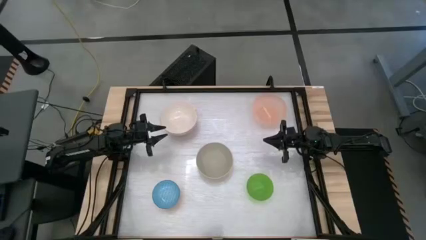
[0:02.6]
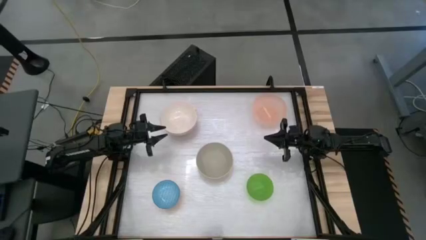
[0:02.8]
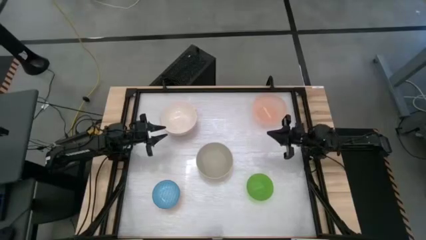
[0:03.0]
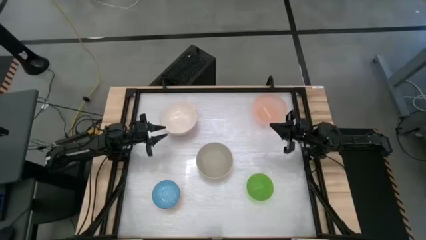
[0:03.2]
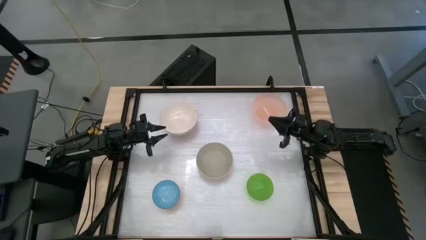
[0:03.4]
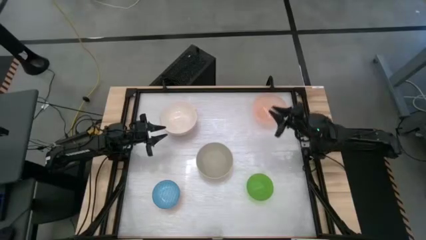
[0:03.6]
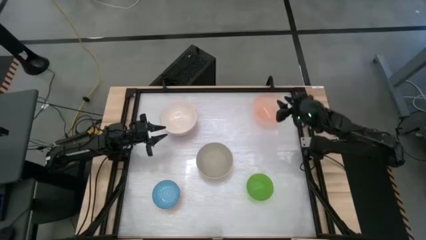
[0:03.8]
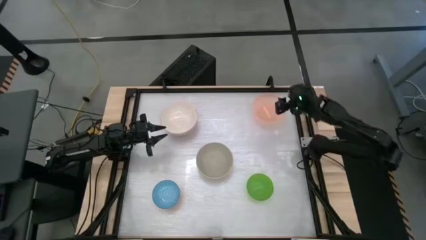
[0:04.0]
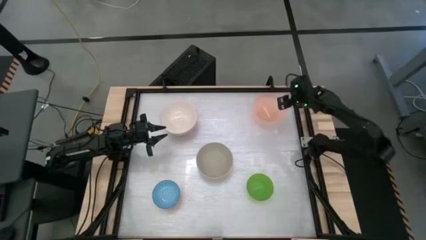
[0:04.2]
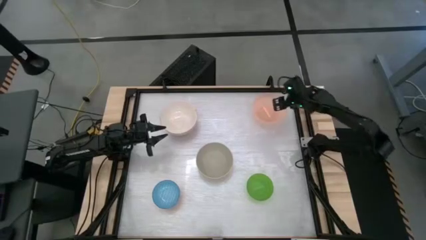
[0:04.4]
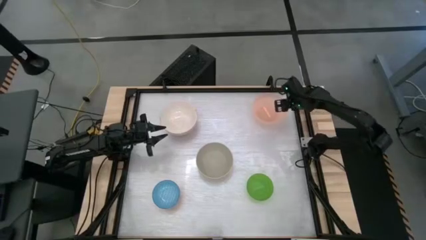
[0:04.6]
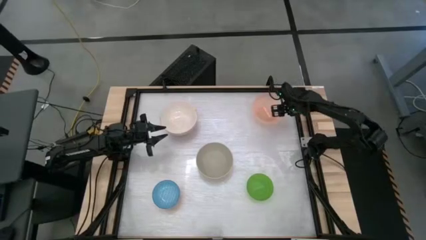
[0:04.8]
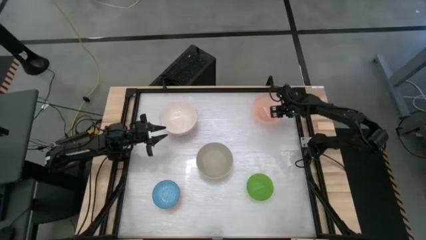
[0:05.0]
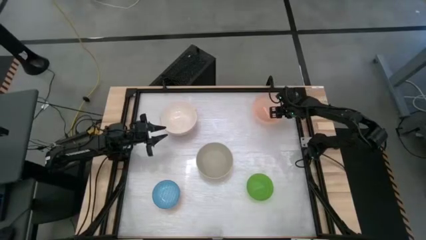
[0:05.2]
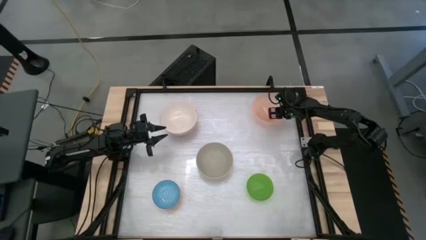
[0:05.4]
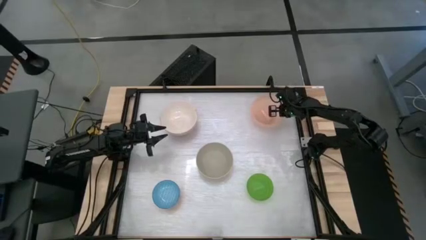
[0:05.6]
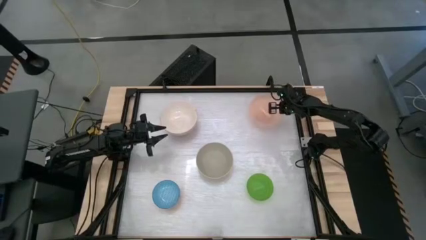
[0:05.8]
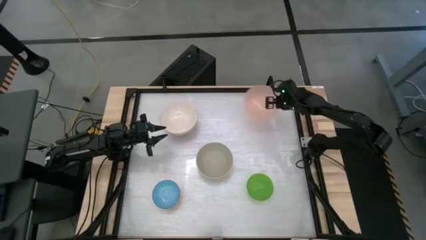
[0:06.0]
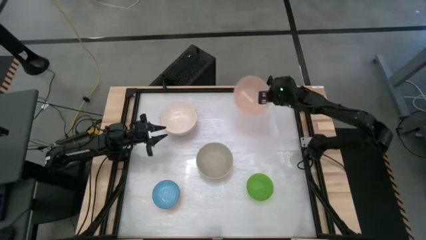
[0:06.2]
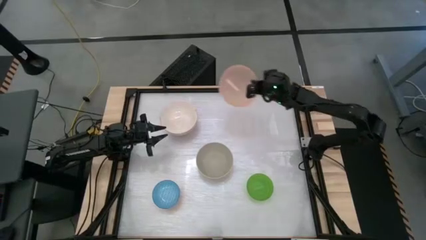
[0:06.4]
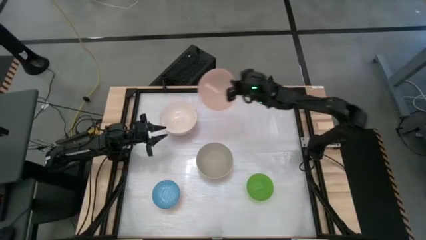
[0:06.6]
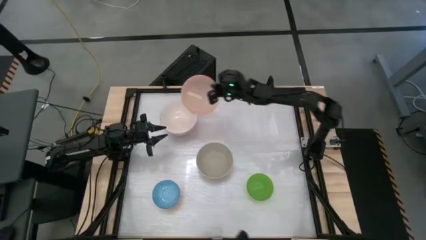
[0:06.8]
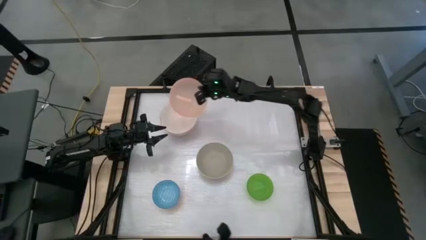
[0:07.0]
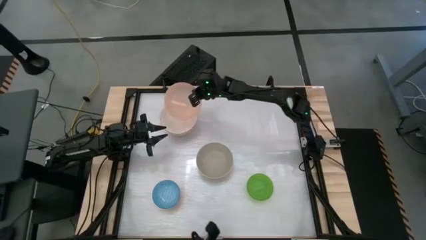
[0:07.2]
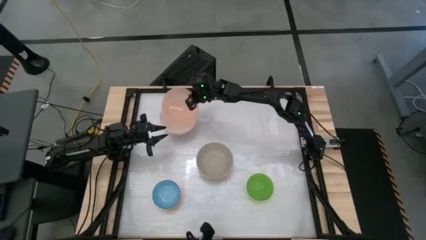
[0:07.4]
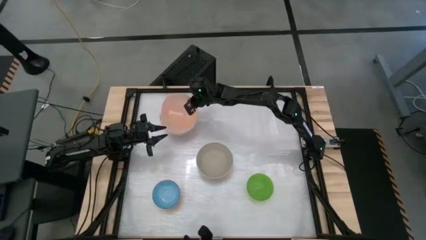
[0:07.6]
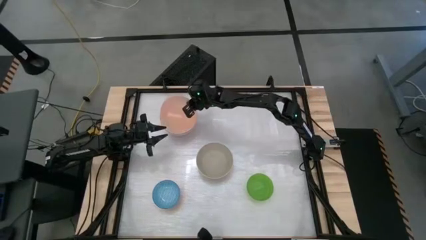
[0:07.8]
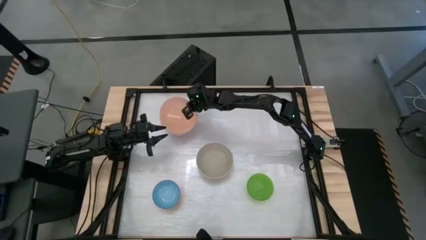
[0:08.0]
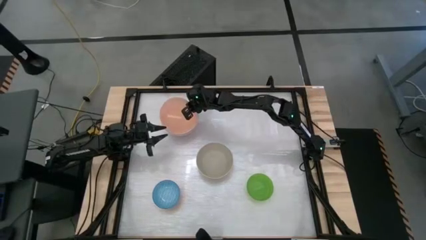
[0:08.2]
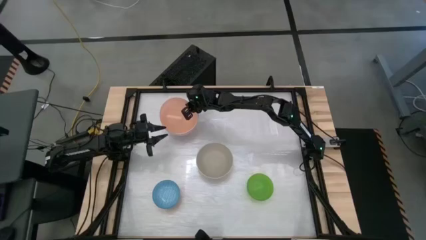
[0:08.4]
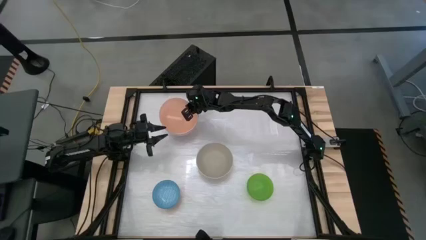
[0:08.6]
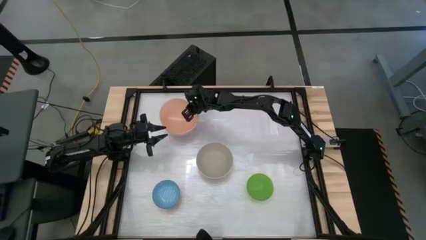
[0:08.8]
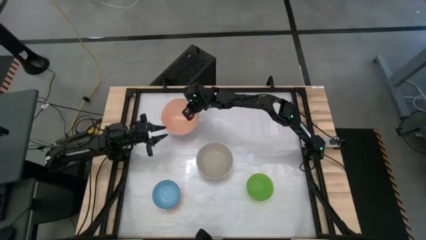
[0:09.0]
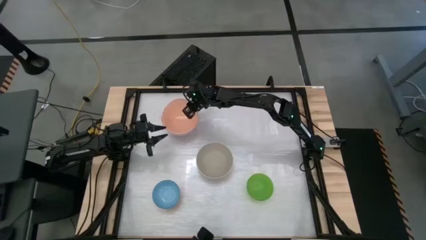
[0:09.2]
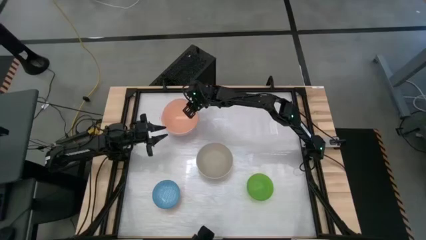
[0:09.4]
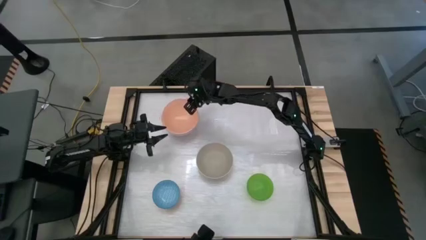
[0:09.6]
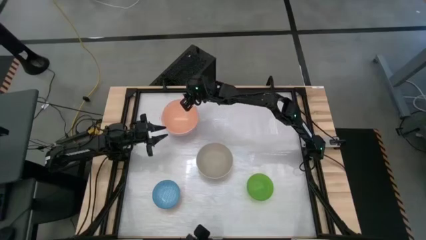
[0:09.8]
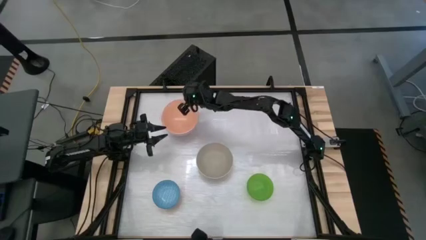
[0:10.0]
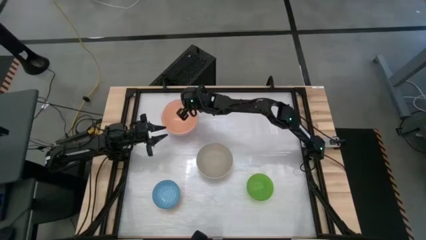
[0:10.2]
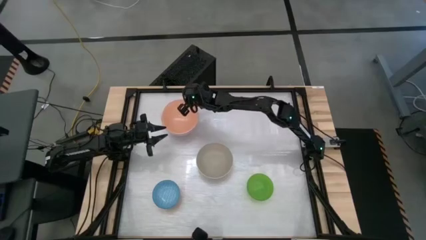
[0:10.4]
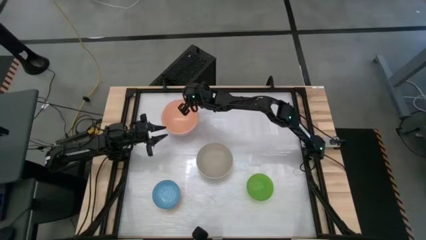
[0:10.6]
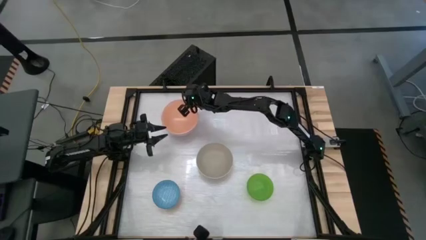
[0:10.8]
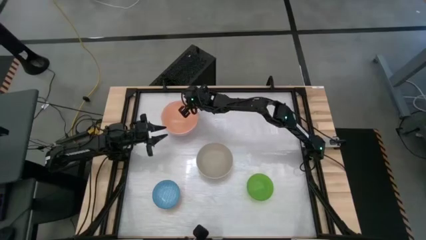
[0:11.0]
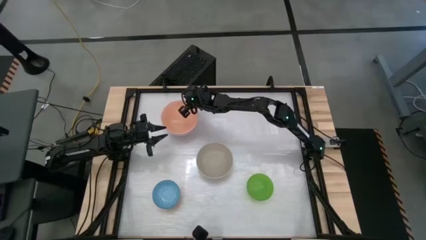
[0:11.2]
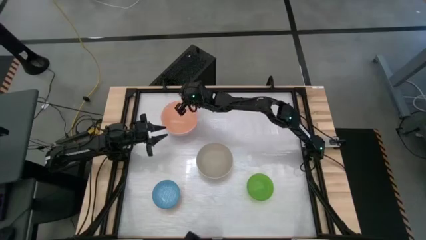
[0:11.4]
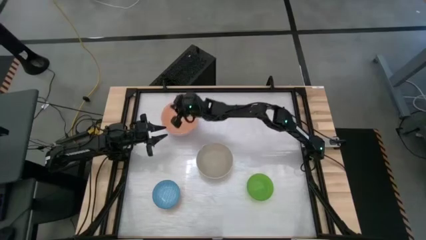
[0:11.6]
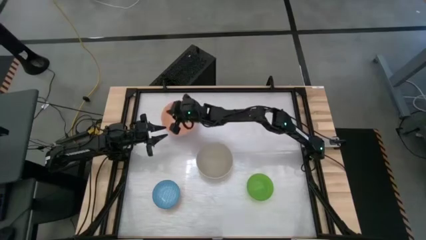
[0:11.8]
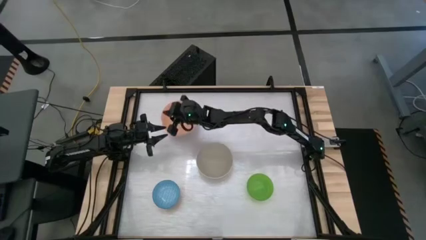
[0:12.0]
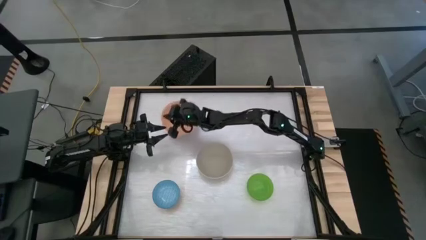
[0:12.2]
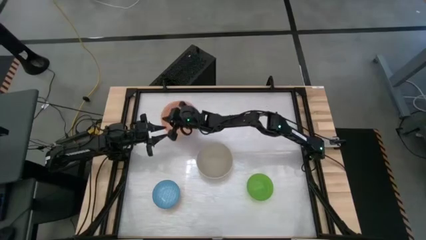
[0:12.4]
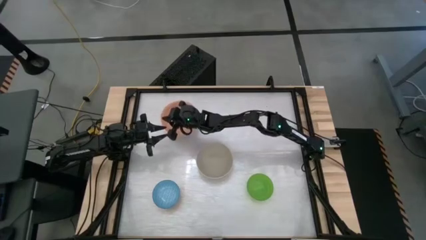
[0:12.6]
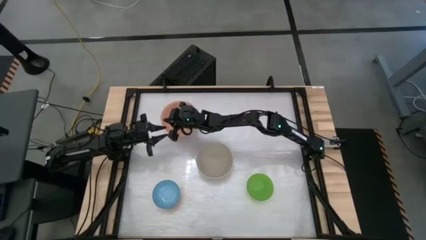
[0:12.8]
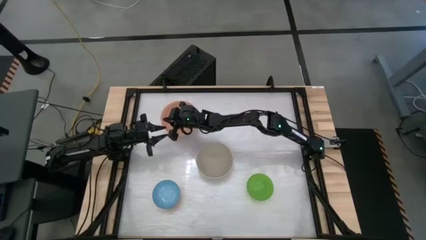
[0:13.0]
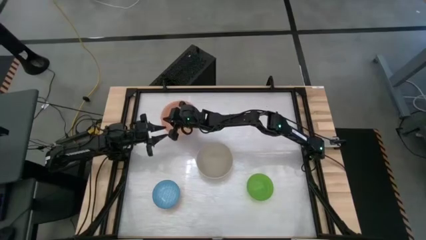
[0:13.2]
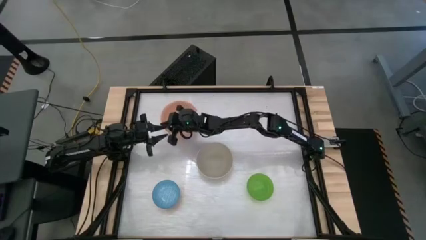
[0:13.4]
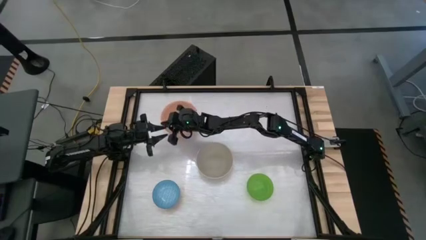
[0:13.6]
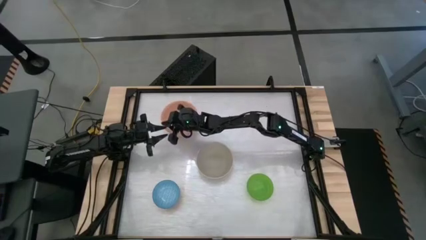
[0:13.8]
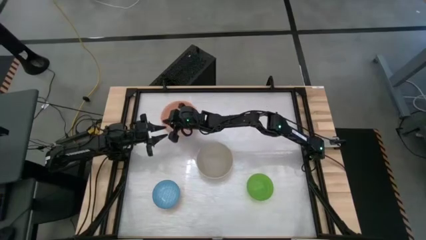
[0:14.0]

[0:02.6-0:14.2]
Stack the orange bowl on top of the white bowl

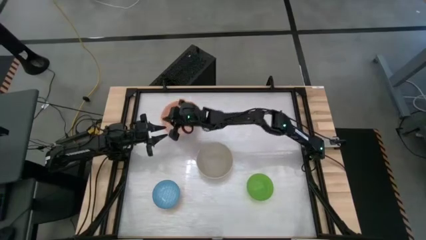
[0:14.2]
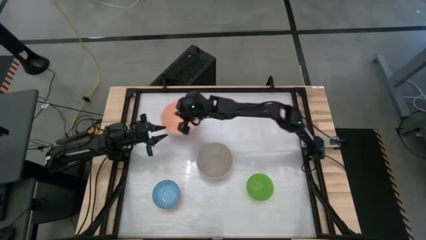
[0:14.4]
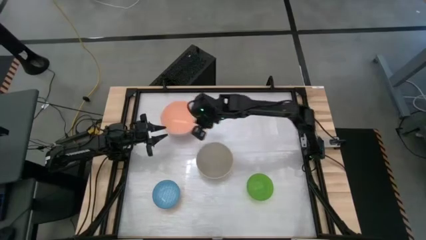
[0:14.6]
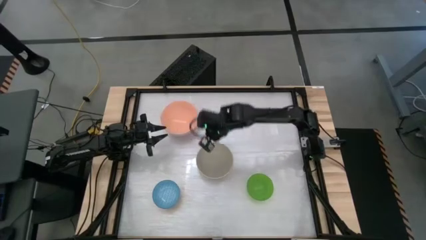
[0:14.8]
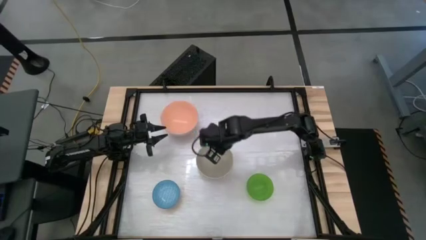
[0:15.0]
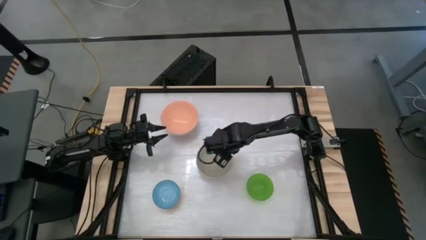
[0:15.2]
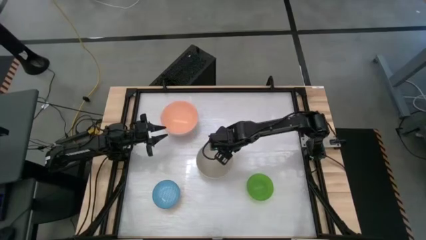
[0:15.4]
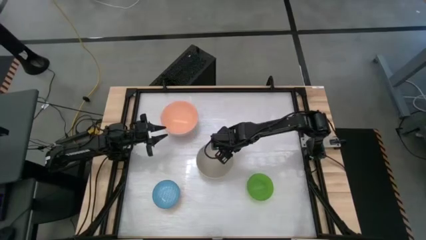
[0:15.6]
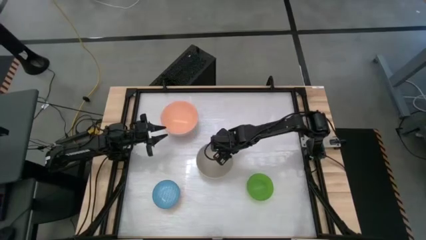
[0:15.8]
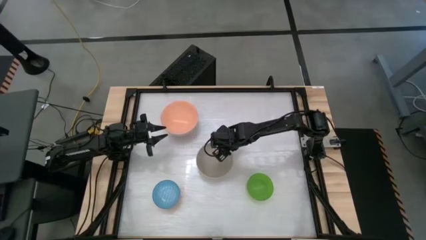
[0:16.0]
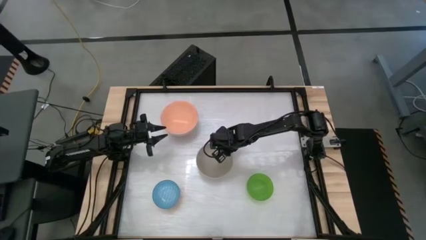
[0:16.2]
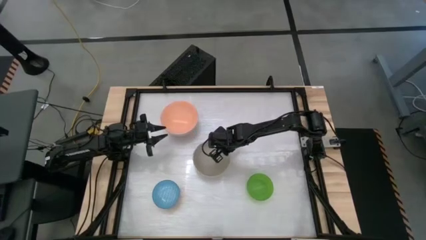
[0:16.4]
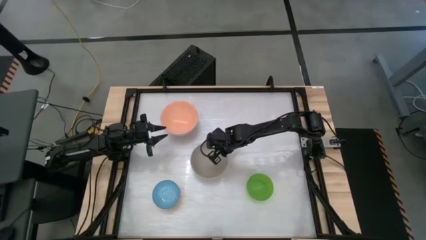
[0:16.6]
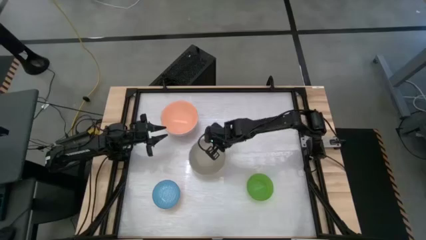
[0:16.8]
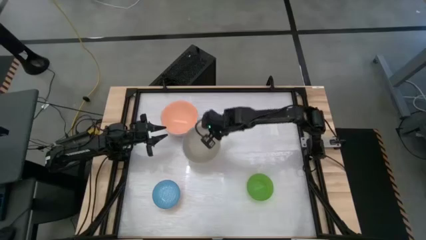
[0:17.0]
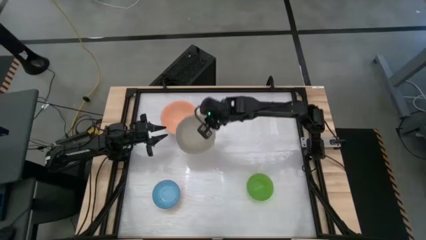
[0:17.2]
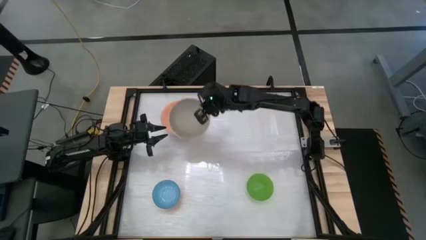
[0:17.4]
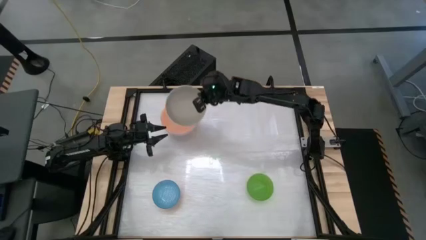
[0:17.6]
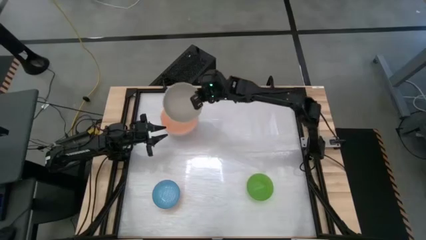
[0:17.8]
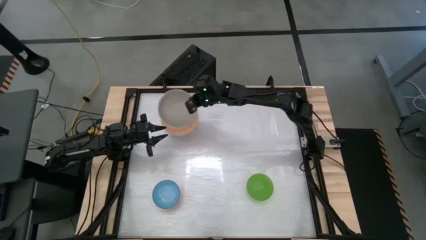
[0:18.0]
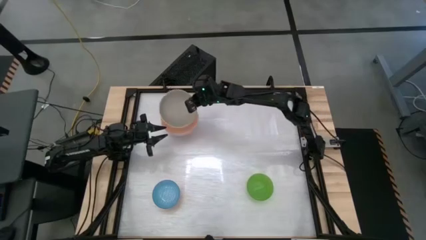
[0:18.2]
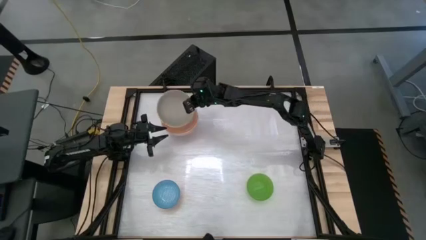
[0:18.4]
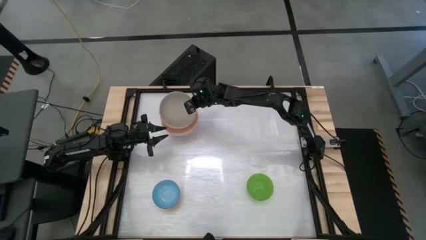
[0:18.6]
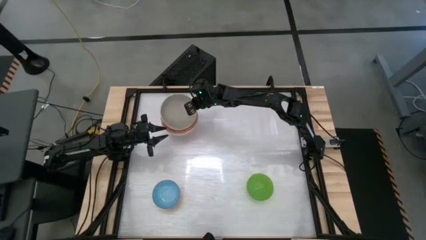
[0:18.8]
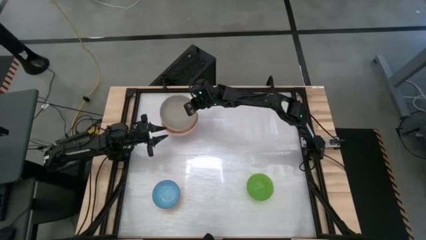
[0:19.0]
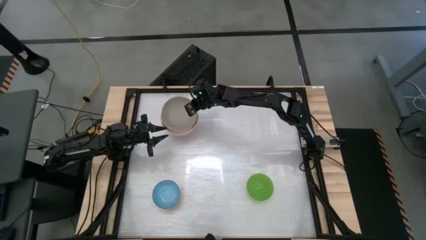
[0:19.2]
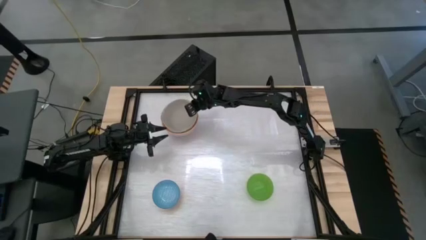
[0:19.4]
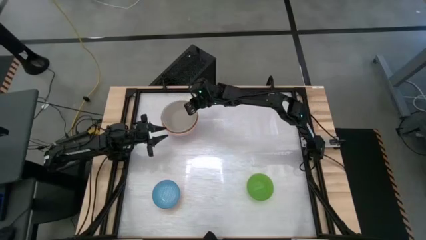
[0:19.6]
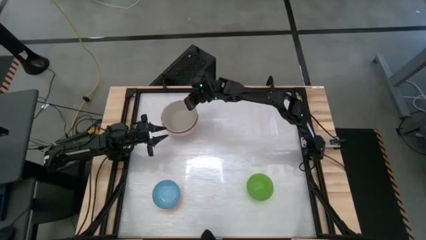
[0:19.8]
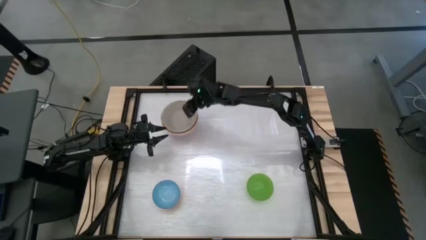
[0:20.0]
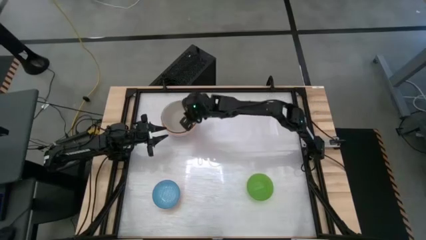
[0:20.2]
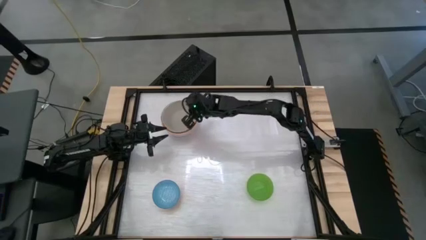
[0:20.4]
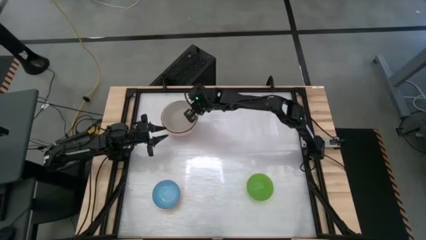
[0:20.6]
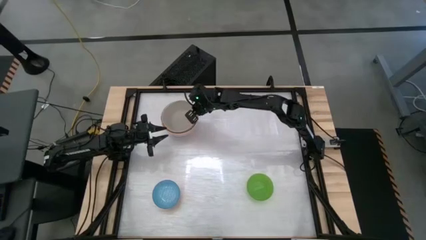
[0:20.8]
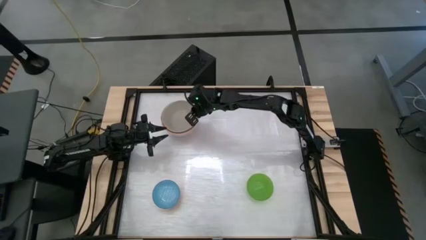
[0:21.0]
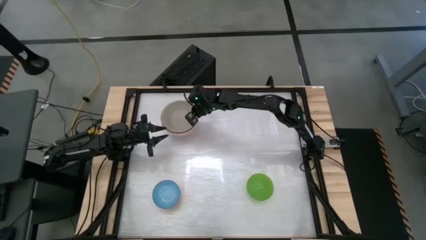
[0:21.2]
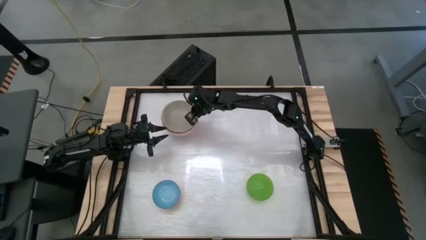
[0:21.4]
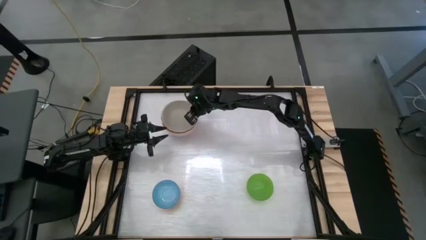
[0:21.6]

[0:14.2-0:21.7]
Stack the gray bowl on top of the orange bowl
